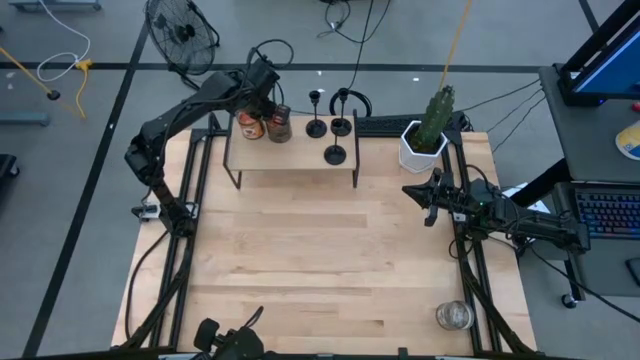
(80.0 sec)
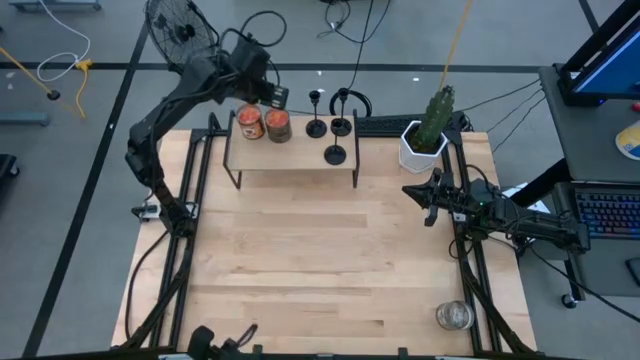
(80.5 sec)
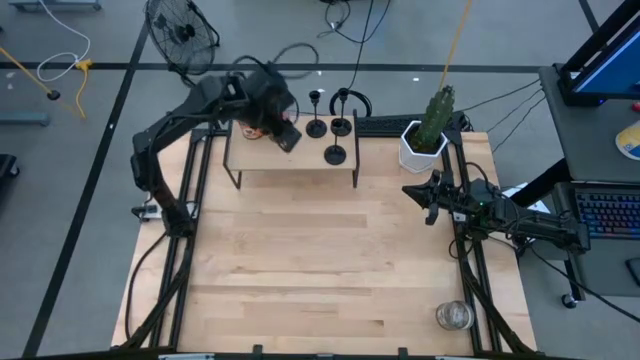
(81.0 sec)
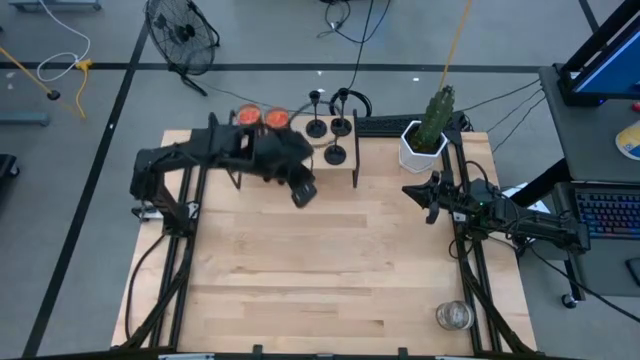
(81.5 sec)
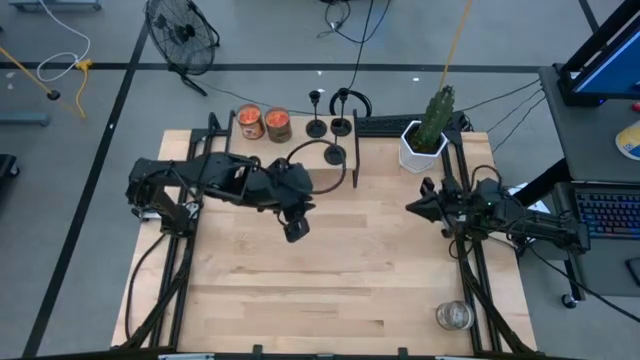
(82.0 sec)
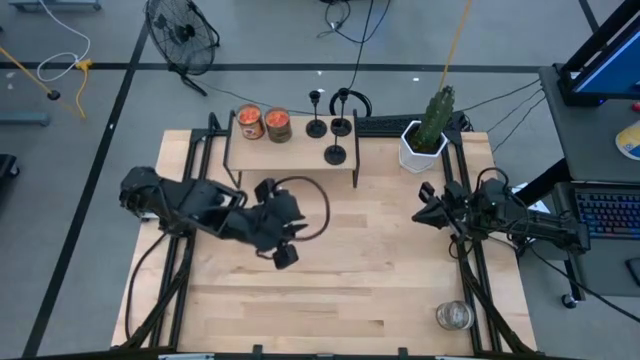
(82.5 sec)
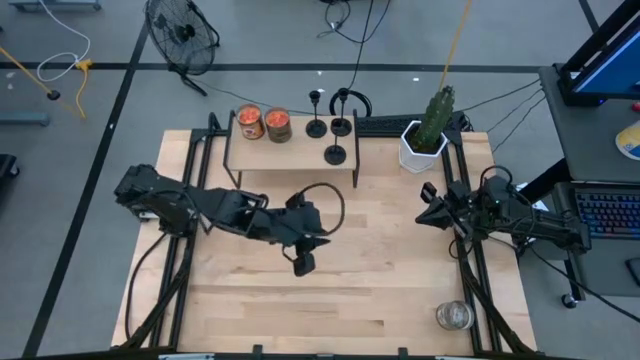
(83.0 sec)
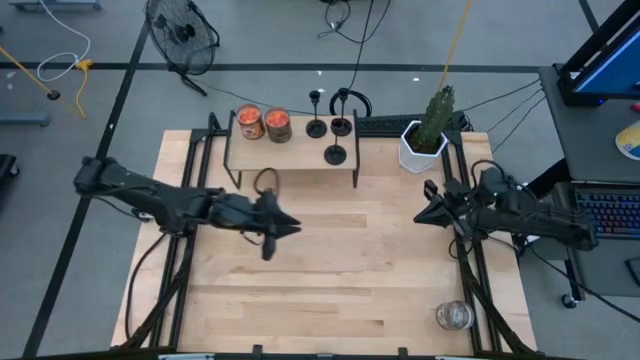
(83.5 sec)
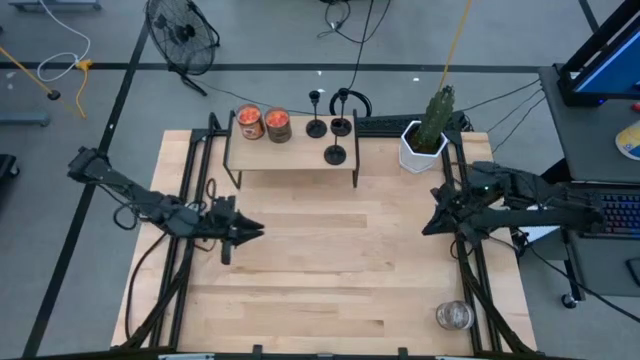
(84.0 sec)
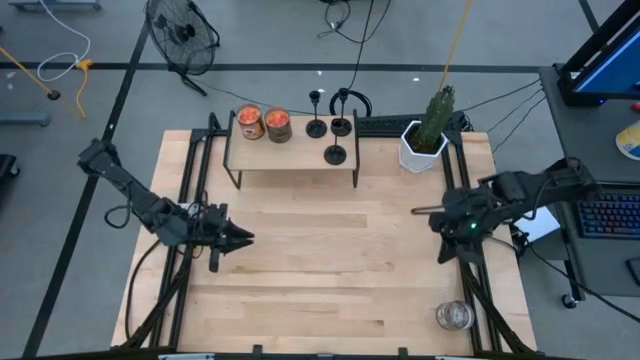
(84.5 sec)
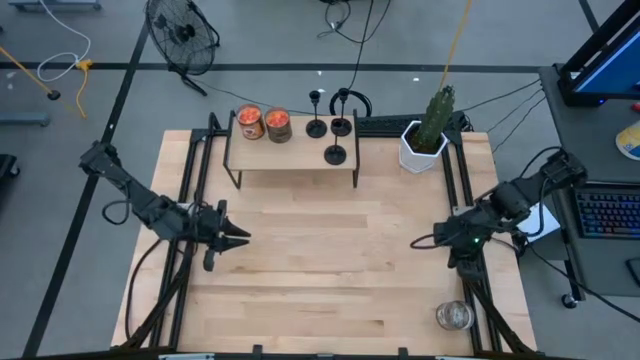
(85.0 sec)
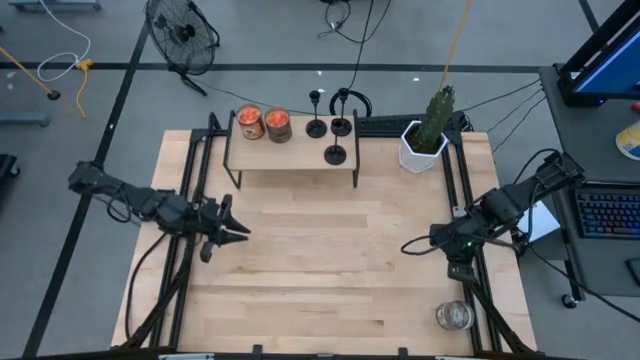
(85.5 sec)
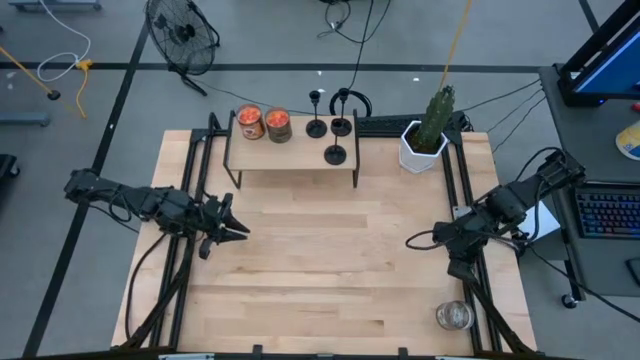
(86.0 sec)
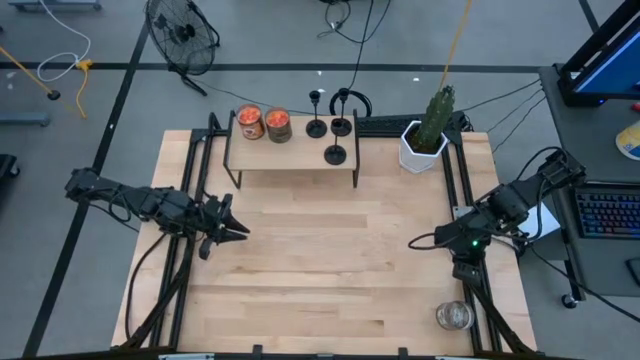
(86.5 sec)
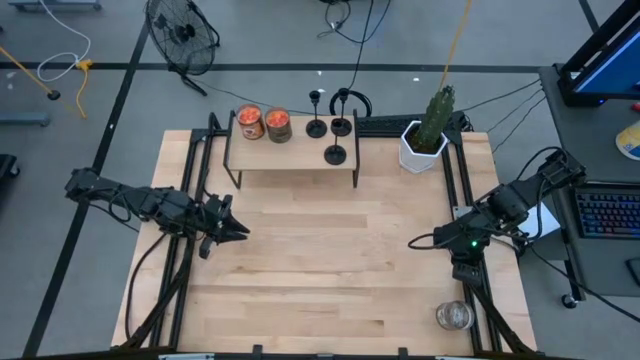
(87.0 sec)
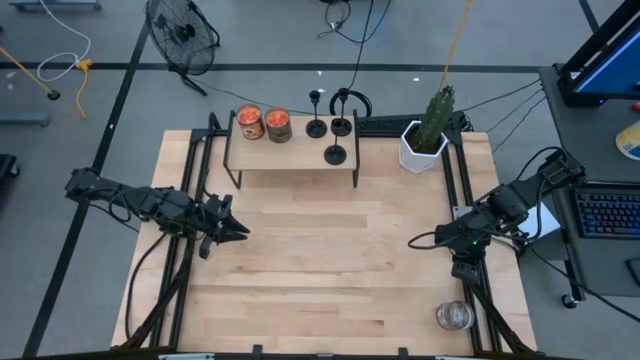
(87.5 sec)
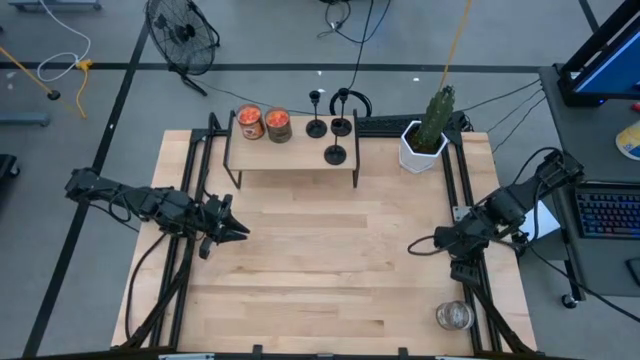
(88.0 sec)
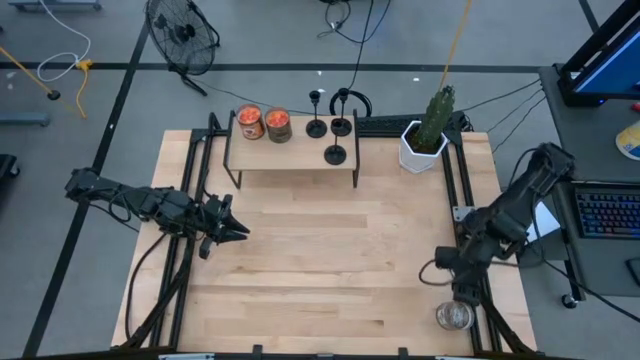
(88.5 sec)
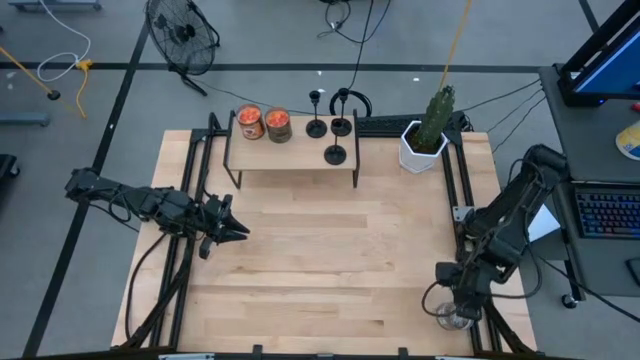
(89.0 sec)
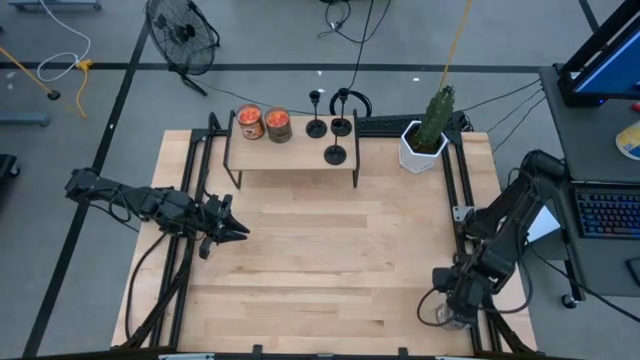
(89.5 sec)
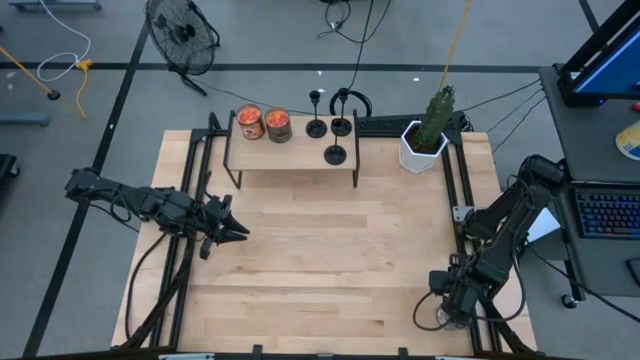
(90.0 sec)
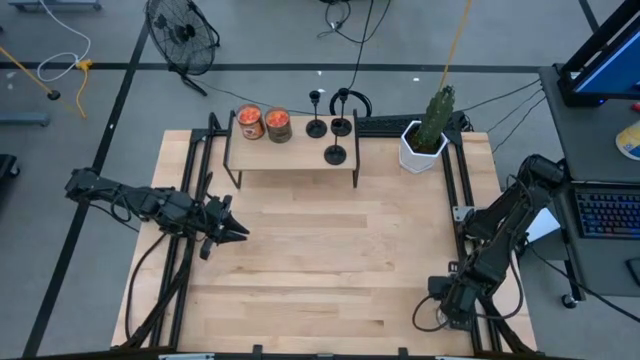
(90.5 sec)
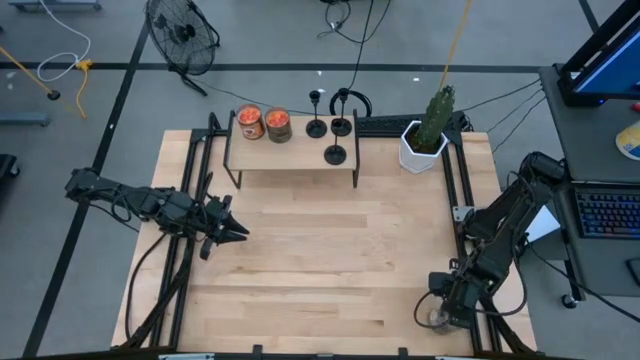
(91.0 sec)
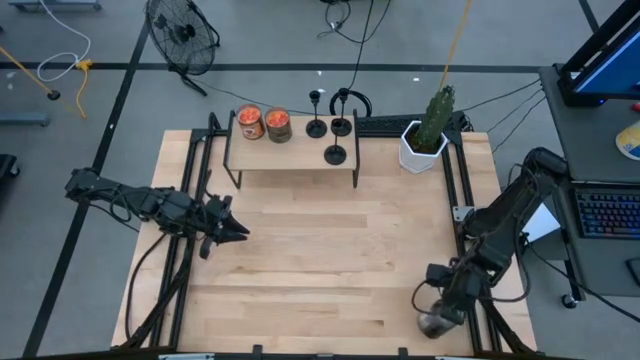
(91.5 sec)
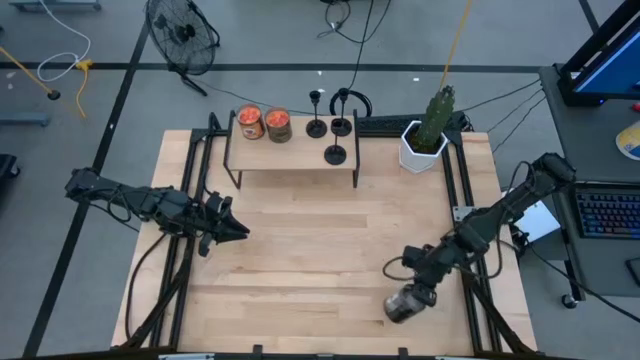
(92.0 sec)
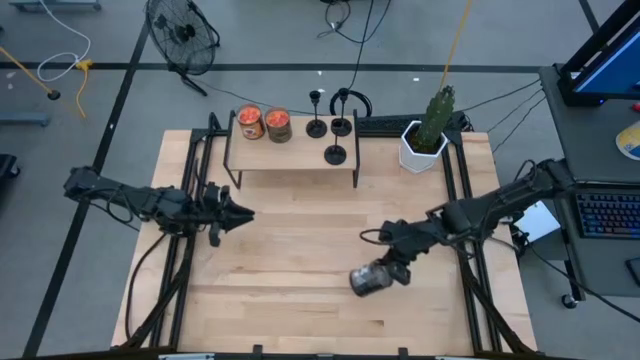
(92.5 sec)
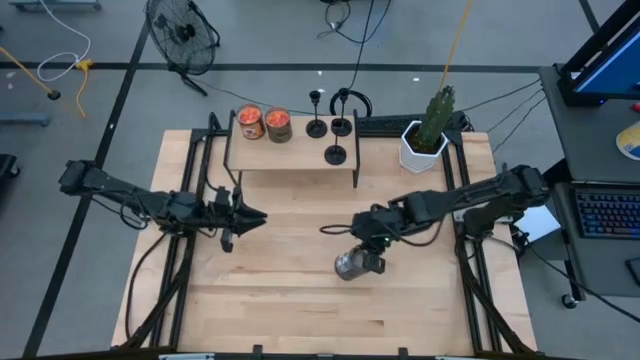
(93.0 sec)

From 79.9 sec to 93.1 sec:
Task: Pick & Place candle stick holders
Put the brown scented candle can on the shelf

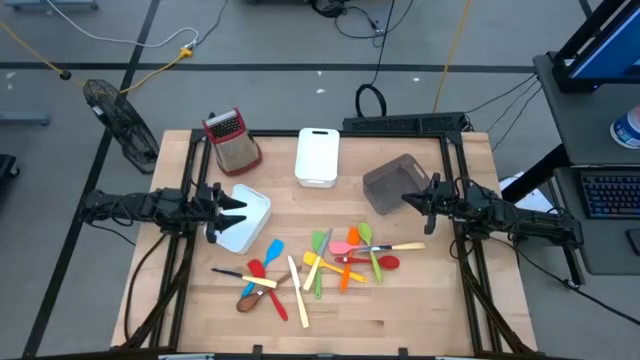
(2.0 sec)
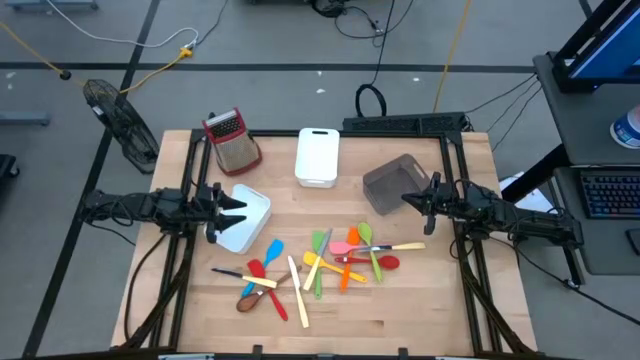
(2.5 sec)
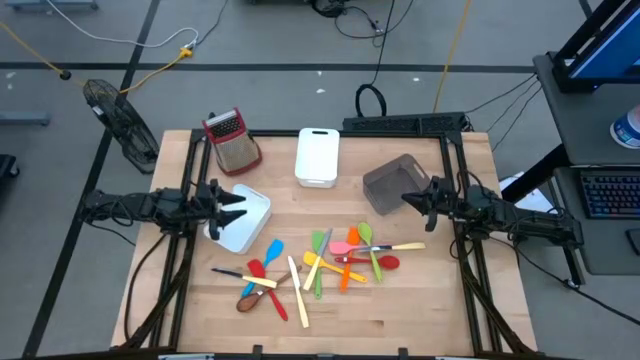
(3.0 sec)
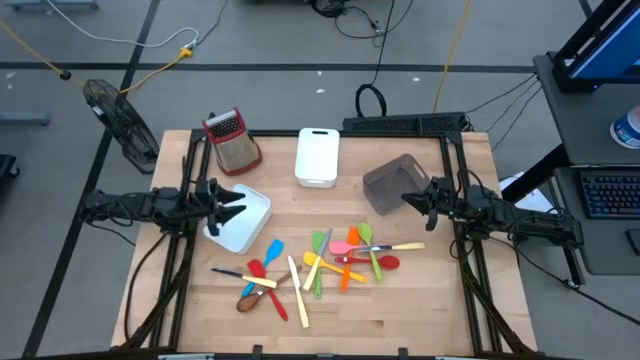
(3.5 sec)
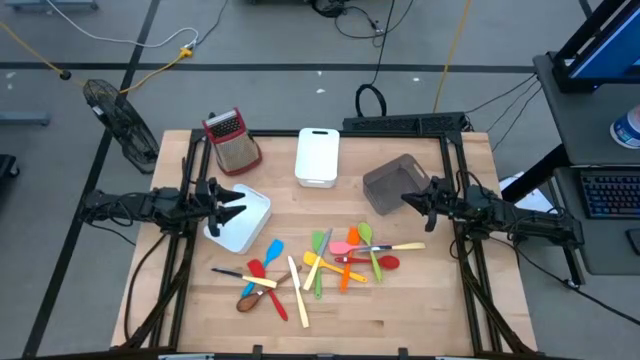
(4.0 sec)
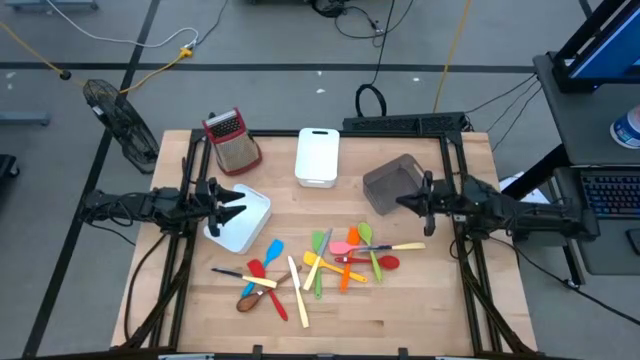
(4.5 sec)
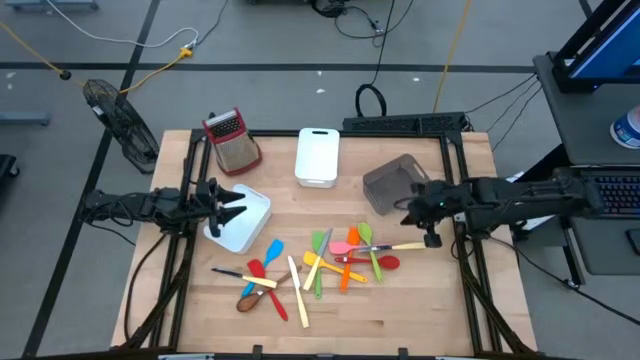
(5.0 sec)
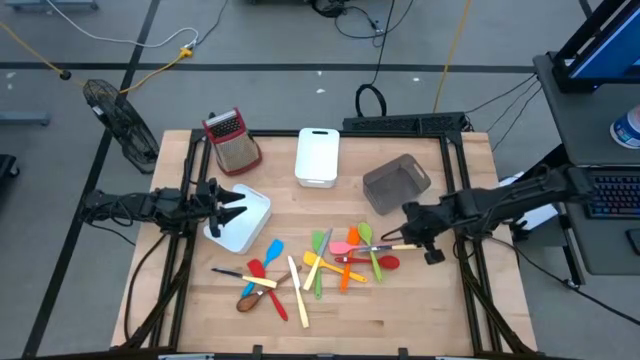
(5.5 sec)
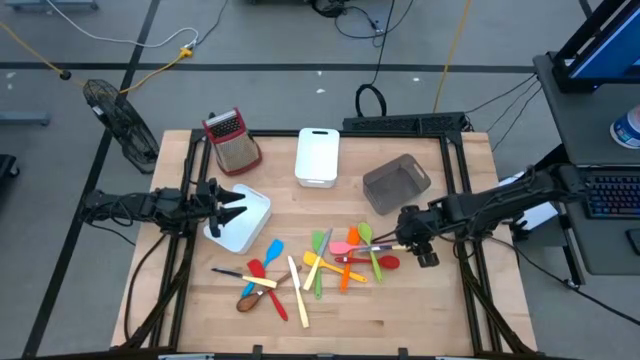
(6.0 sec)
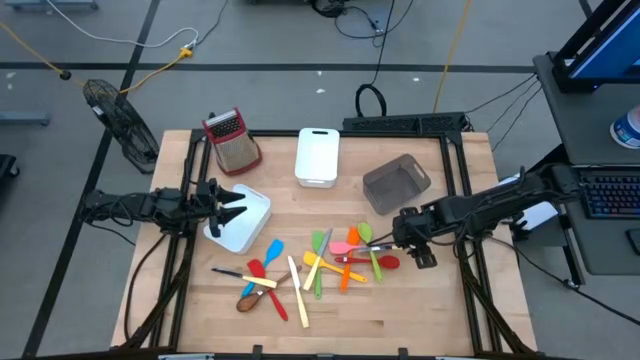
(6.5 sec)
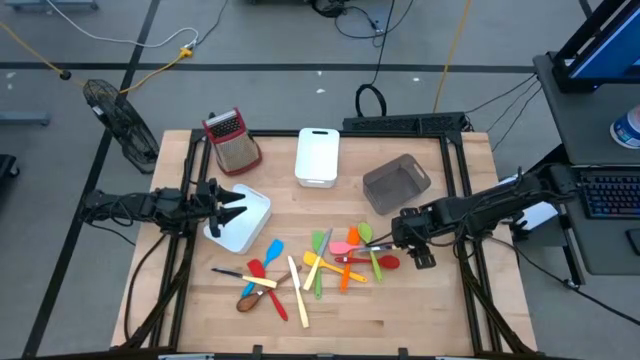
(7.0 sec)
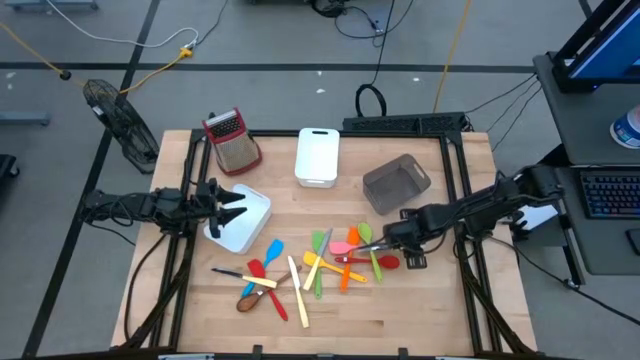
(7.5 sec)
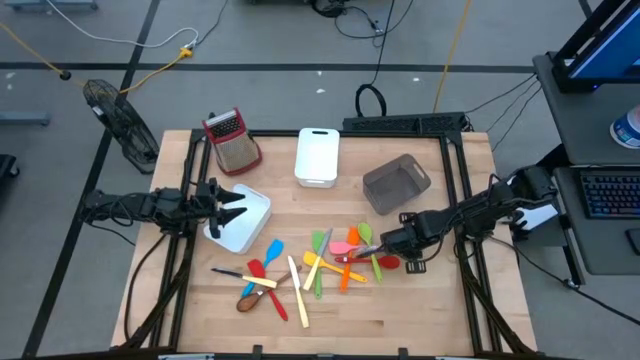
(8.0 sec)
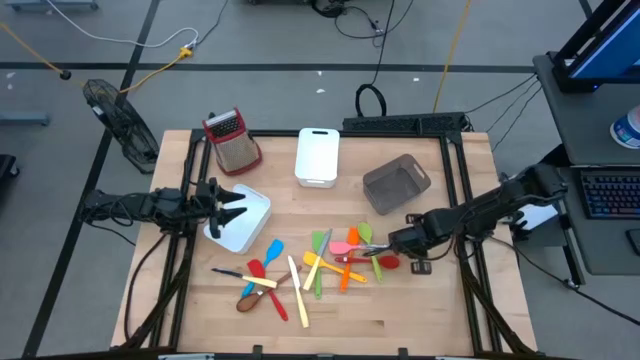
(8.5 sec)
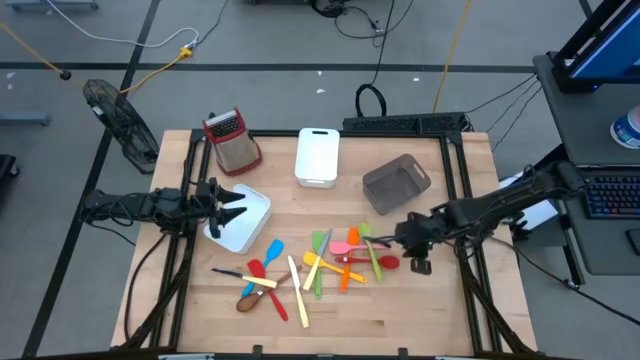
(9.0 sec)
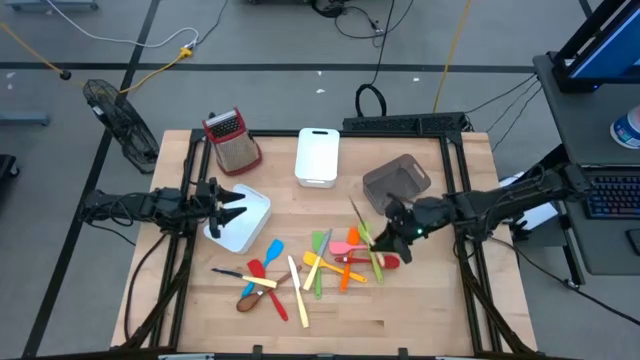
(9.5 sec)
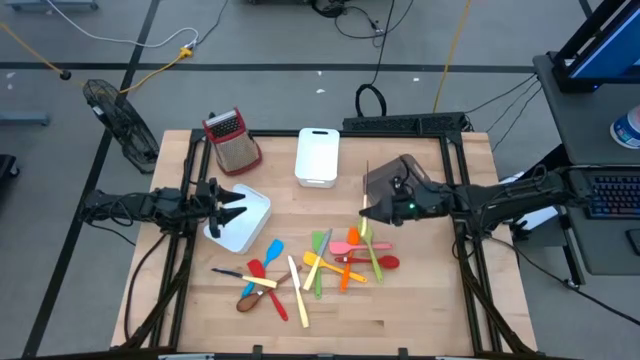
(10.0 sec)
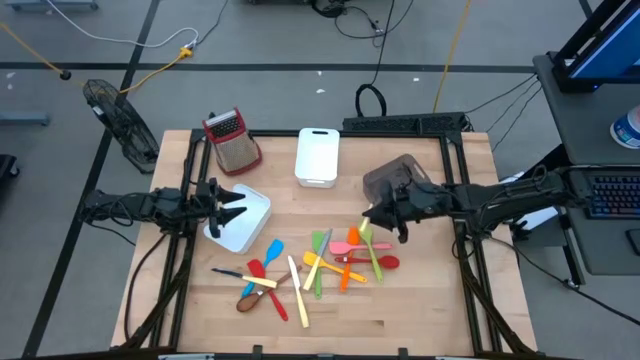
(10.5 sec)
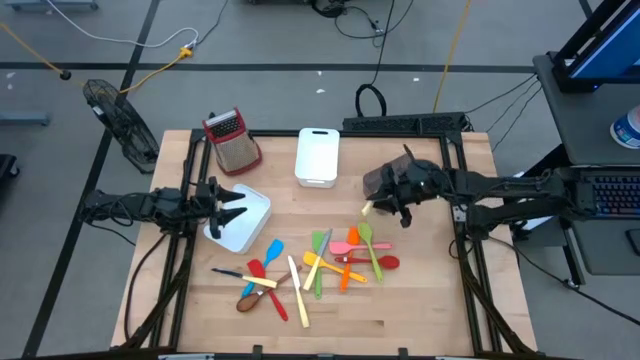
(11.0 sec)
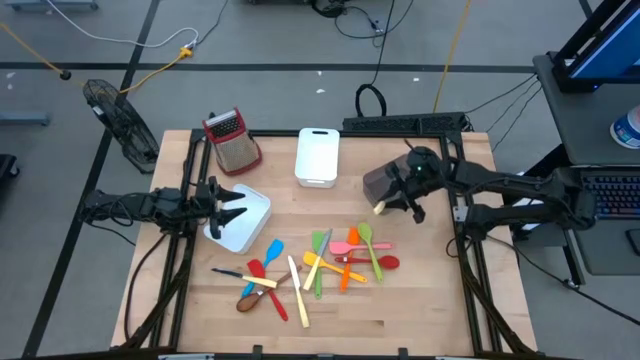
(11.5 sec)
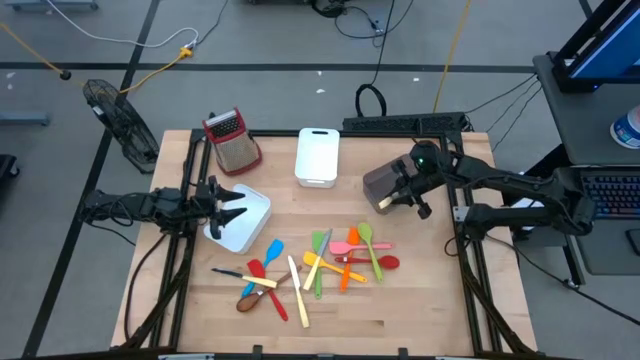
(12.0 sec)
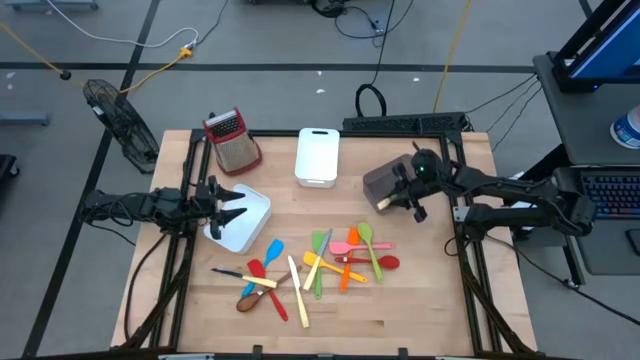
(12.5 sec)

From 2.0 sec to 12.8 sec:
Task: Pick & Place Kitchen Items
Put the yellow table knife into the black bin
